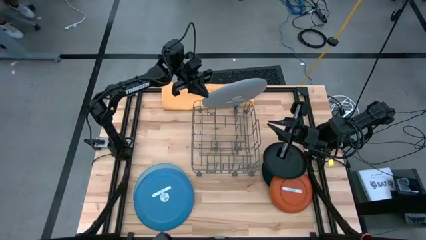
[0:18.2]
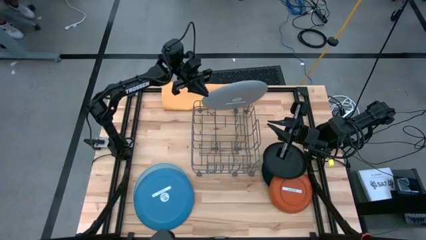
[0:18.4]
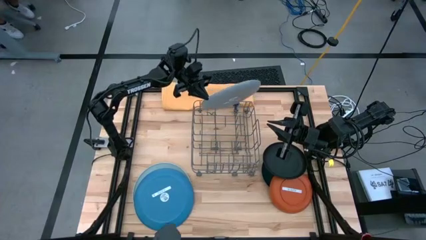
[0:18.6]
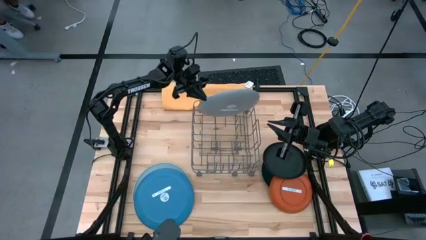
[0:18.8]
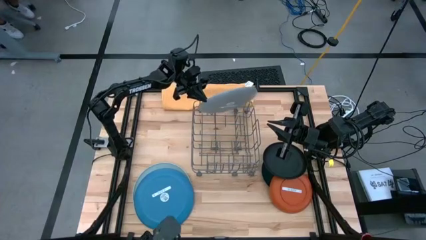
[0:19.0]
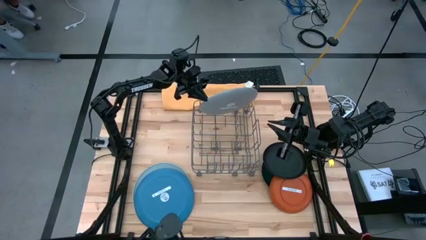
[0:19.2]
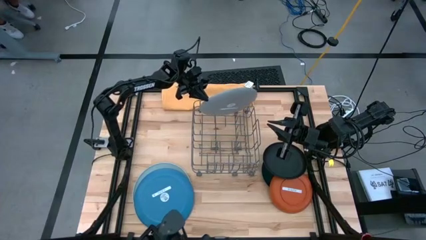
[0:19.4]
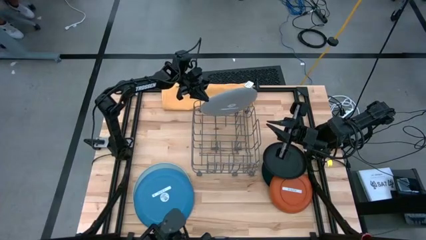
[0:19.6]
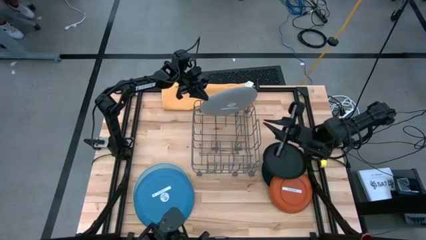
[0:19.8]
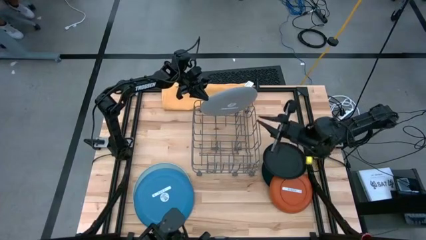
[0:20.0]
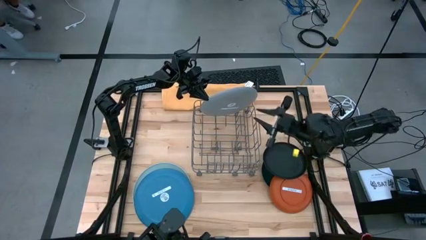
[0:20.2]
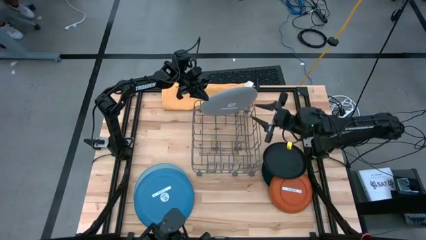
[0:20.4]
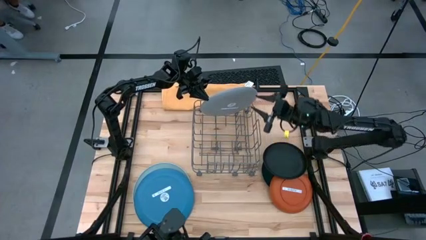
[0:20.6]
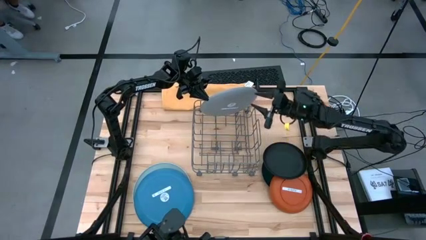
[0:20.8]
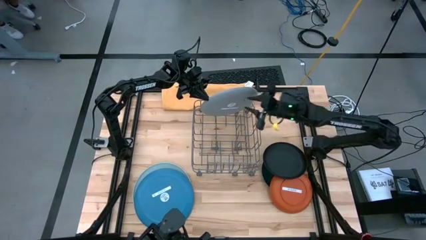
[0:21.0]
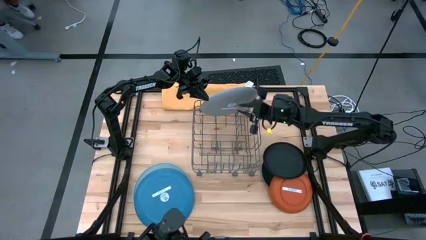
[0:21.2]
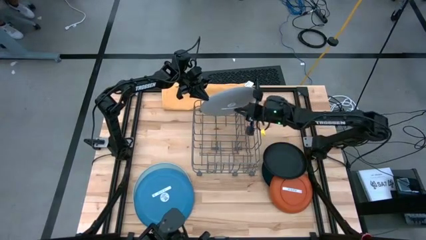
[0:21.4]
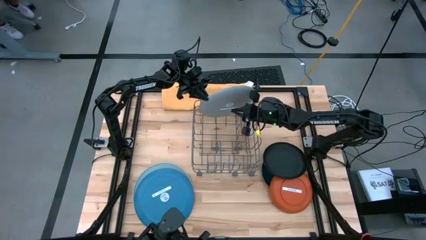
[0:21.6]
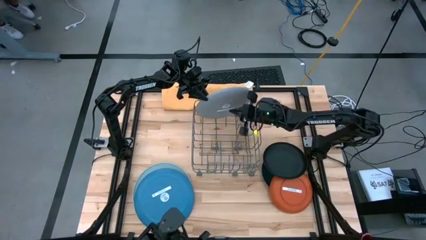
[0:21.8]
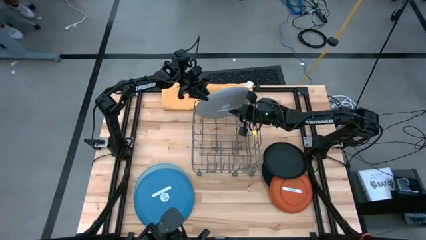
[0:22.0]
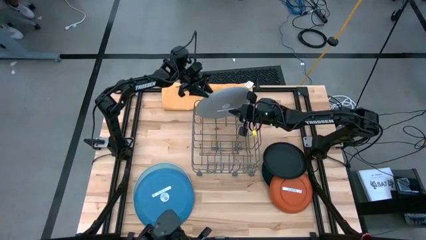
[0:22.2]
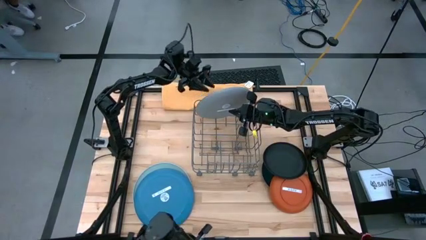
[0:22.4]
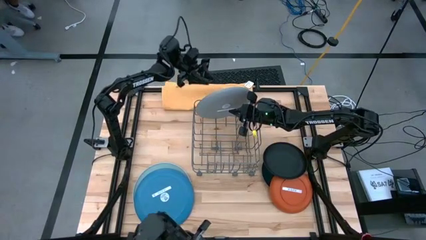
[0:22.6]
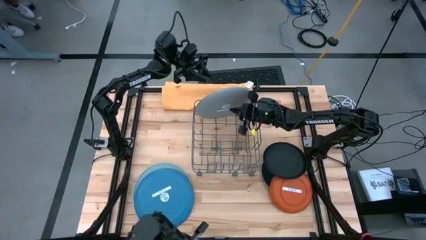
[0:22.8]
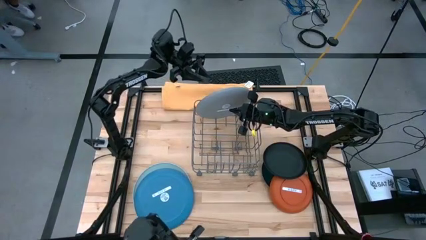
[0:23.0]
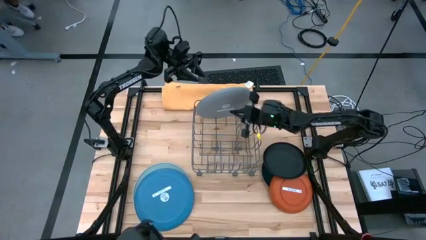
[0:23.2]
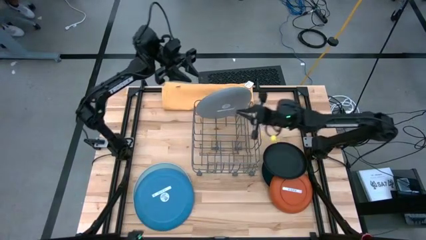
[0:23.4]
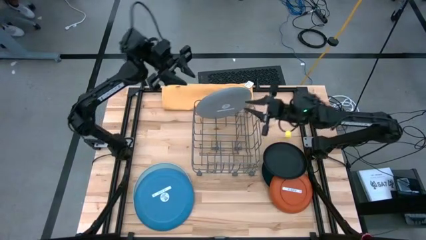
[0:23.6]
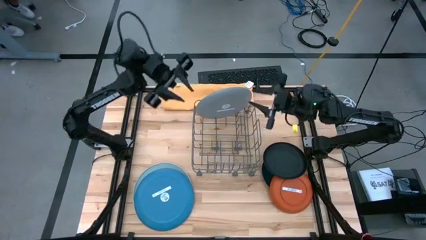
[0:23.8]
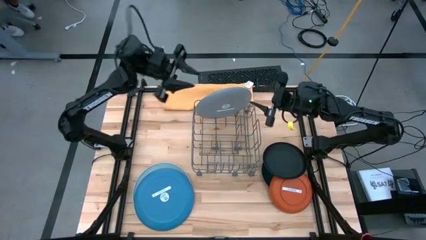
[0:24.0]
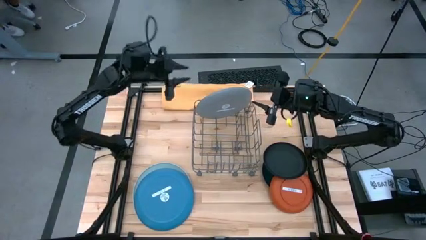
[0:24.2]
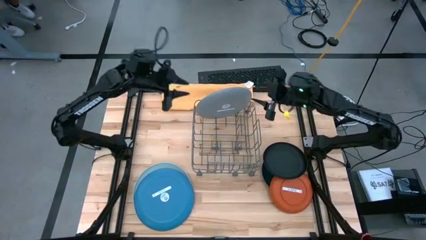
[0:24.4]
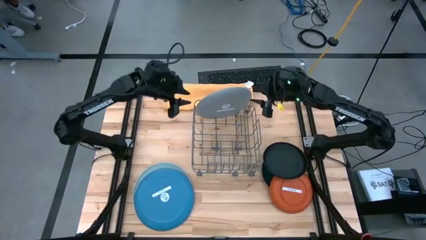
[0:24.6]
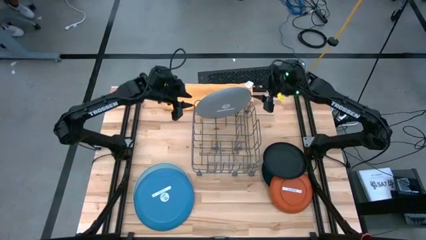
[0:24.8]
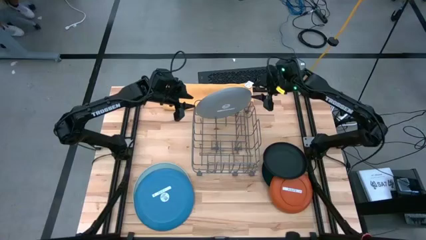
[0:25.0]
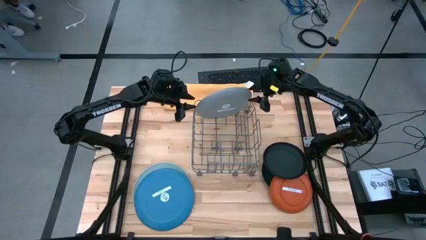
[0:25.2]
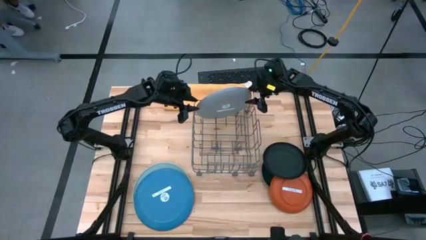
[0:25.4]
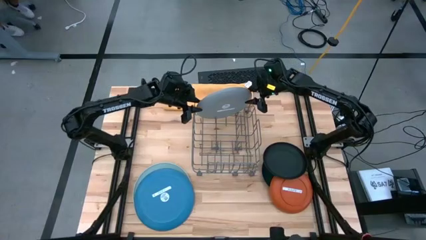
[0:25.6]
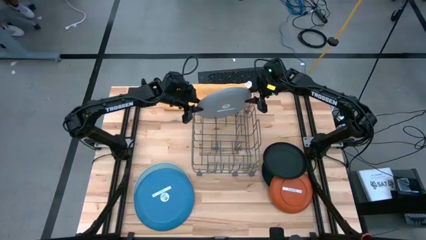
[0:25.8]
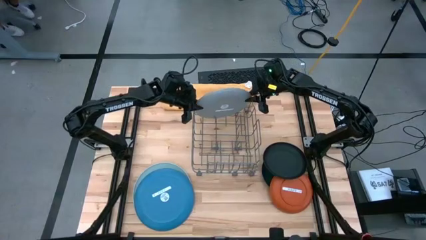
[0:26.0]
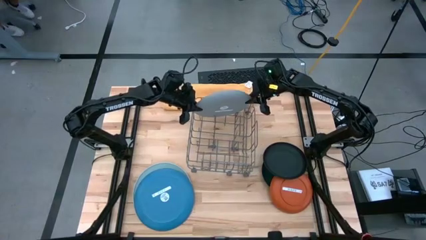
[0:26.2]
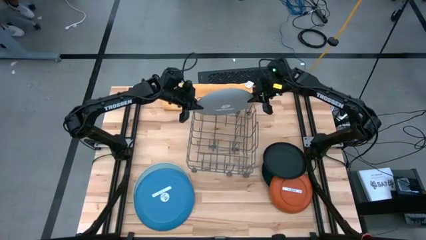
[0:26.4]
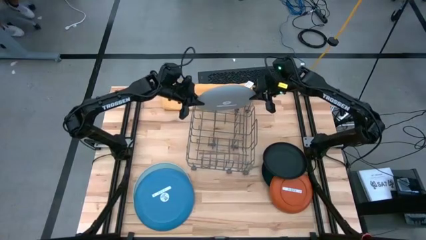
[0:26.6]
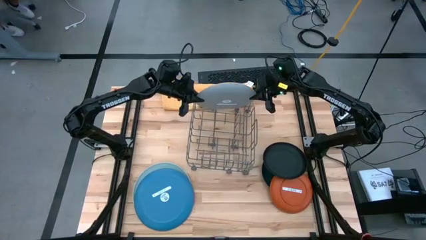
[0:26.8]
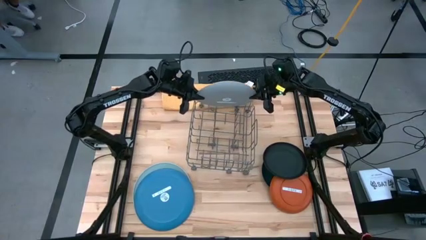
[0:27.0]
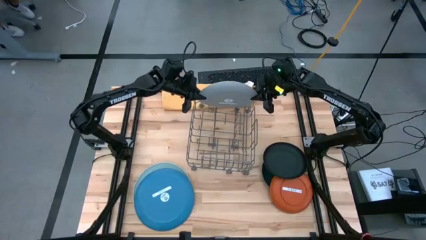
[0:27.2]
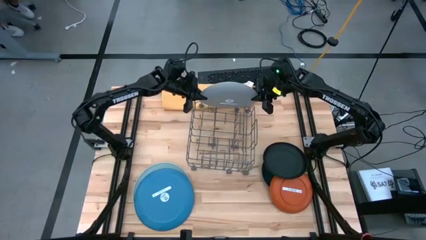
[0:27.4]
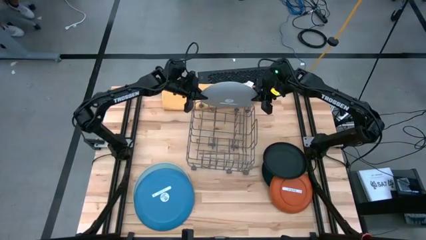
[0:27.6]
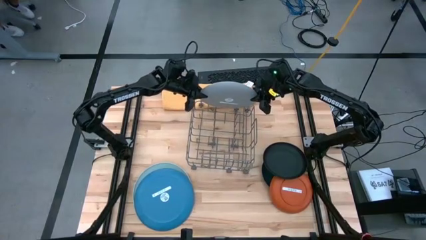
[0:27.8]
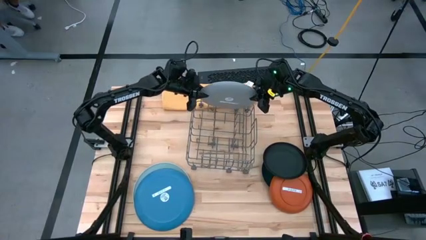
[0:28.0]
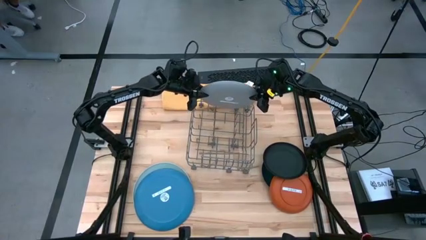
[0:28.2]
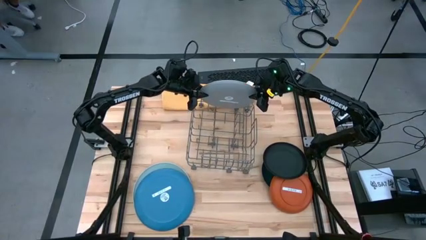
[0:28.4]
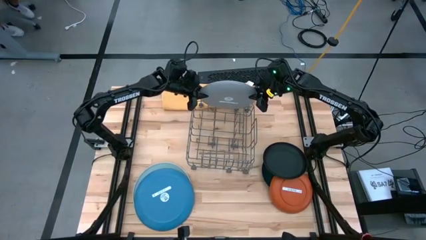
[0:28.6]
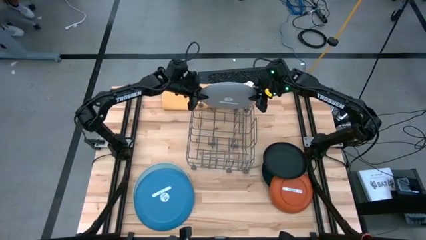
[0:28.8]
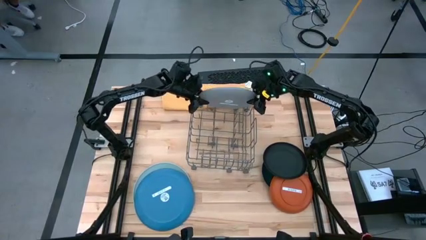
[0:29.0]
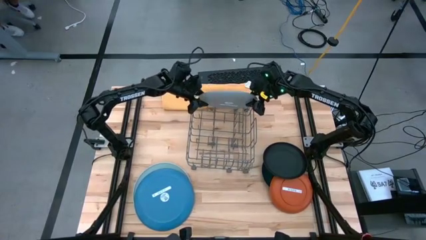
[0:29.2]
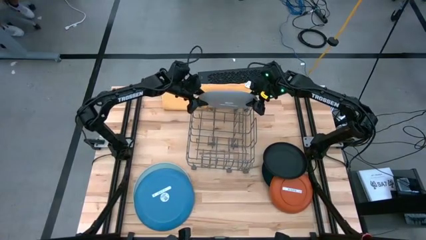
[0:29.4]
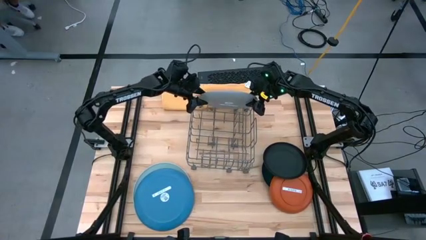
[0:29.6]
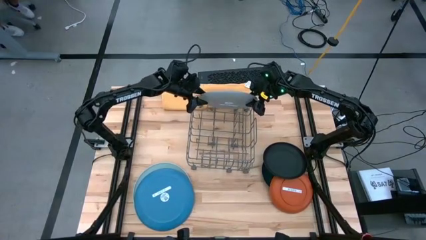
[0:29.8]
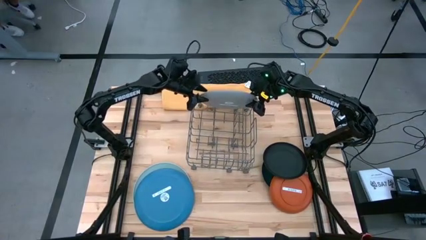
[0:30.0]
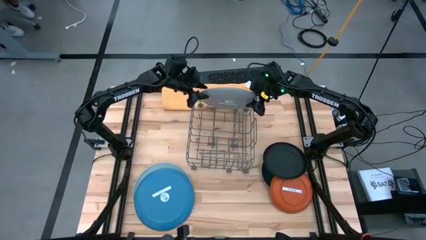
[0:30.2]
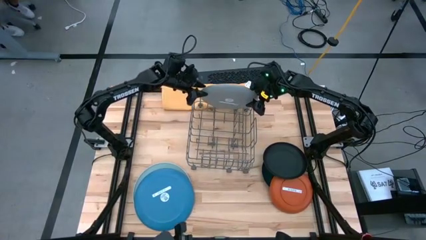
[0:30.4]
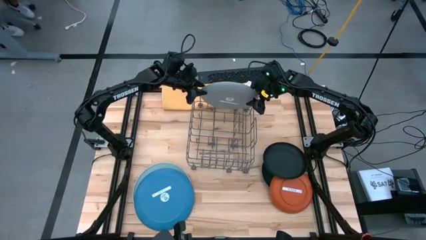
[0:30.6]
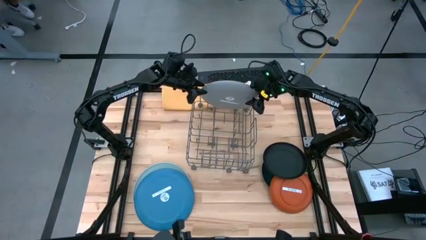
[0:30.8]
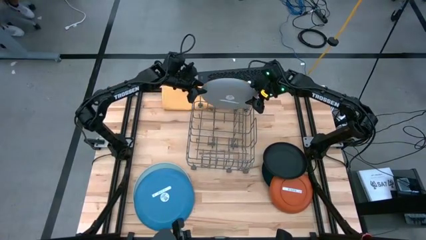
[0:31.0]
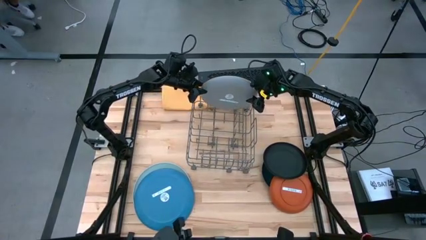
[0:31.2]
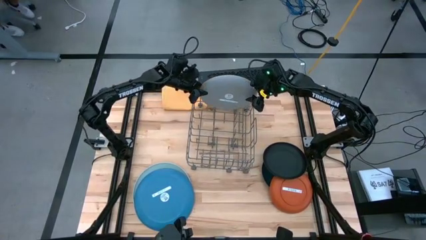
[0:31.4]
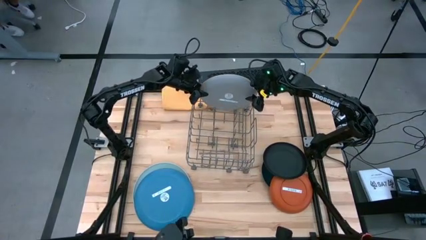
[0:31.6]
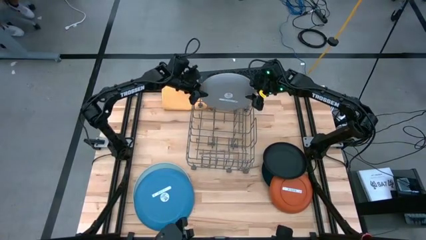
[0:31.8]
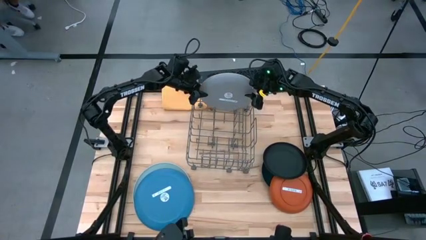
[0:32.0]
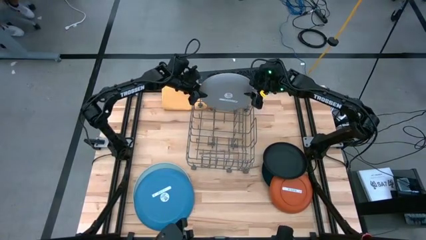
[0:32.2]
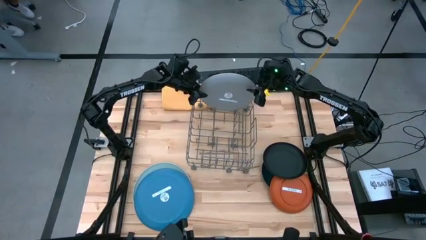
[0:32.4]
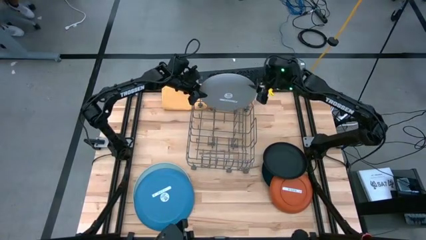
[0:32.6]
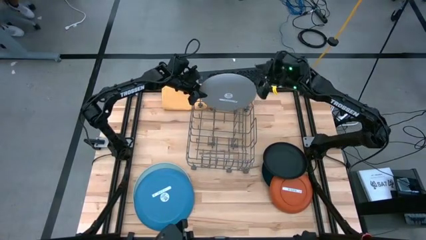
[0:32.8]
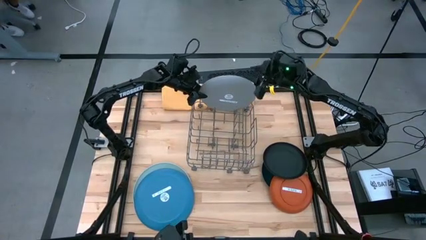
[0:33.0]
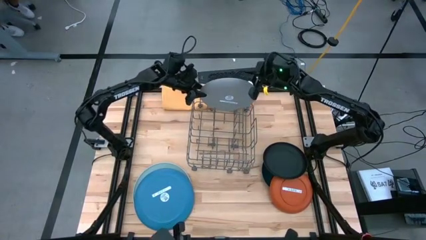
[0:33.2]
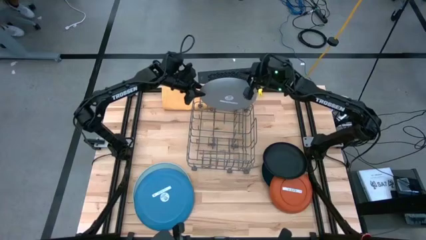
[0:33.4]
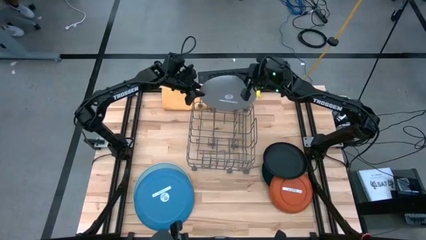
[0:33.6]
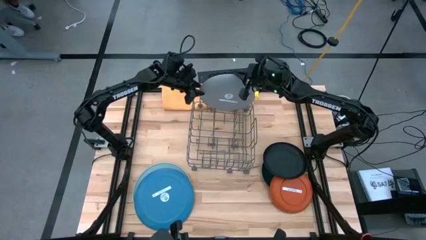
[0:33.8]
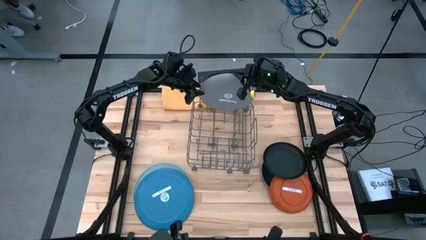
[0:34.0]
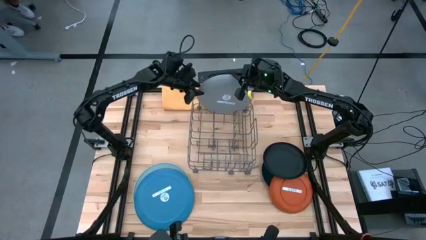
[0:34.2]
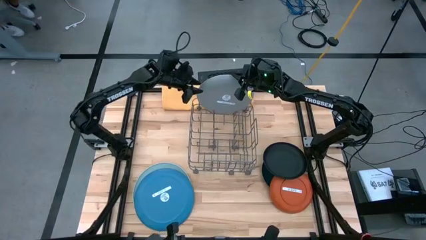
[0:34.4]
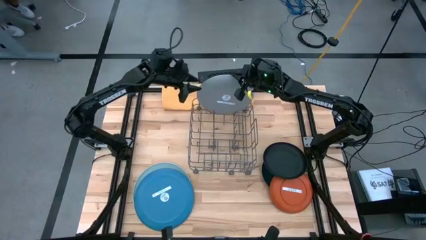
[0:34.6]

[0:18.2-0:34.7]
Task: Sort dishes
Put the gray plate into the dish rack
